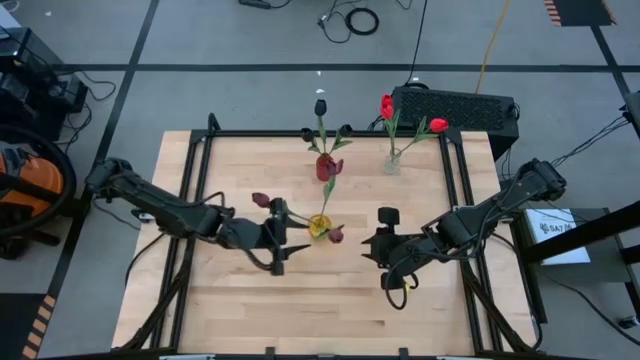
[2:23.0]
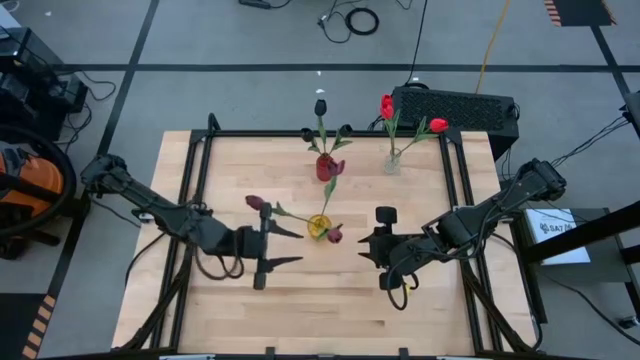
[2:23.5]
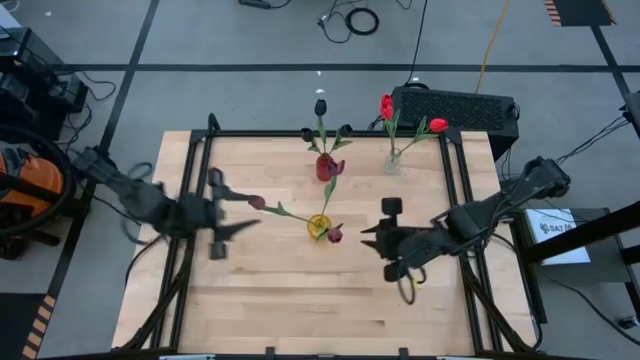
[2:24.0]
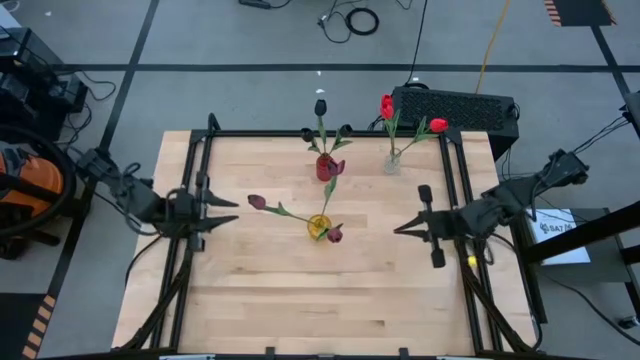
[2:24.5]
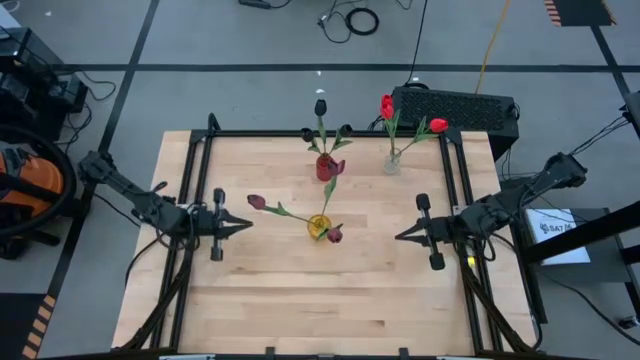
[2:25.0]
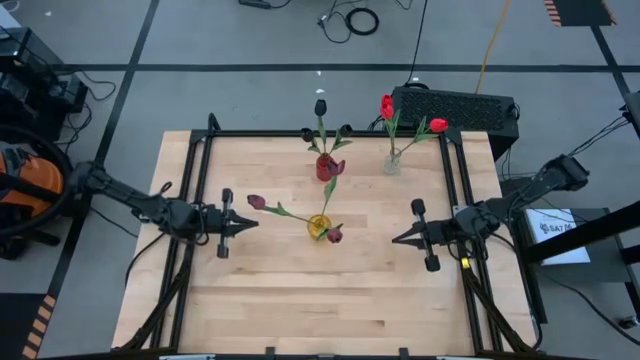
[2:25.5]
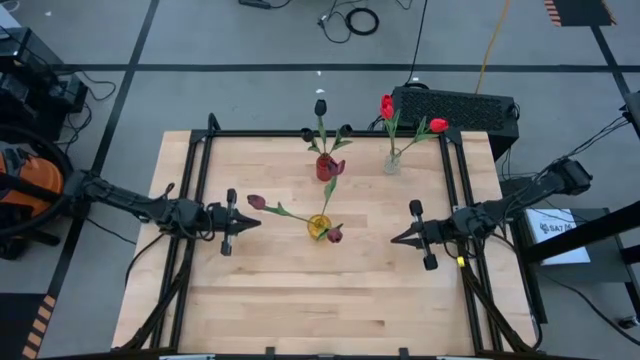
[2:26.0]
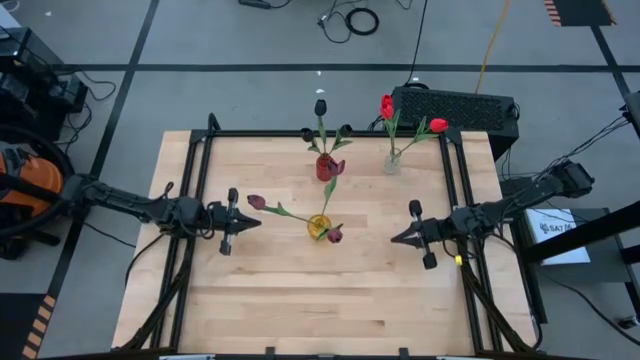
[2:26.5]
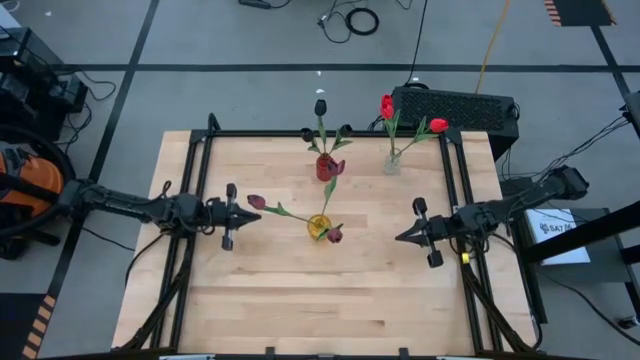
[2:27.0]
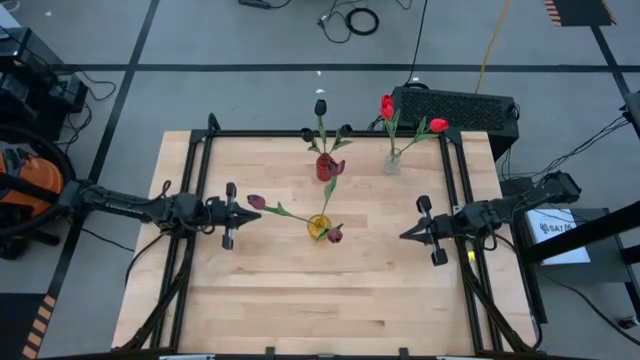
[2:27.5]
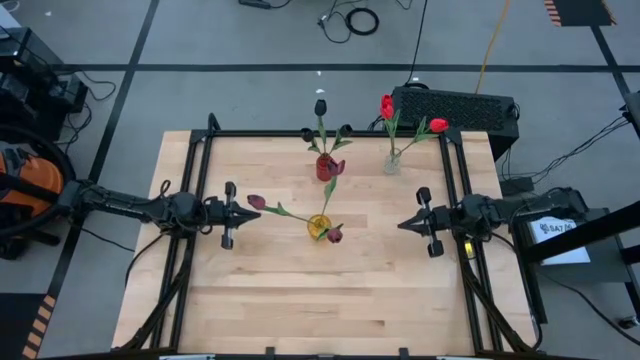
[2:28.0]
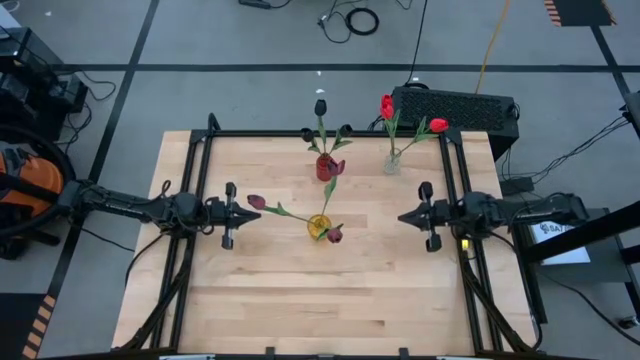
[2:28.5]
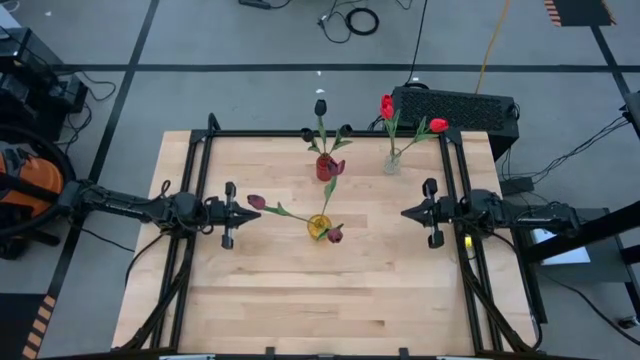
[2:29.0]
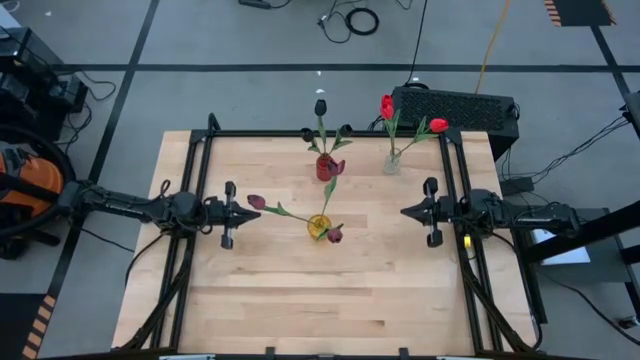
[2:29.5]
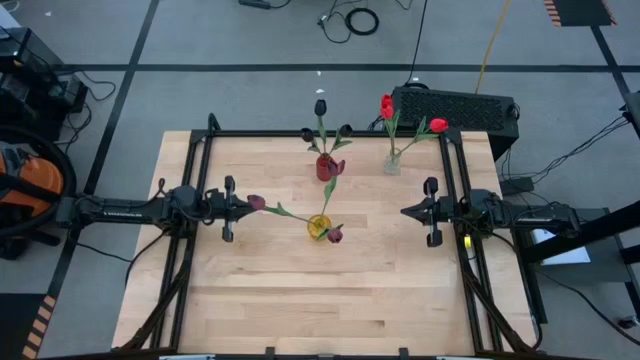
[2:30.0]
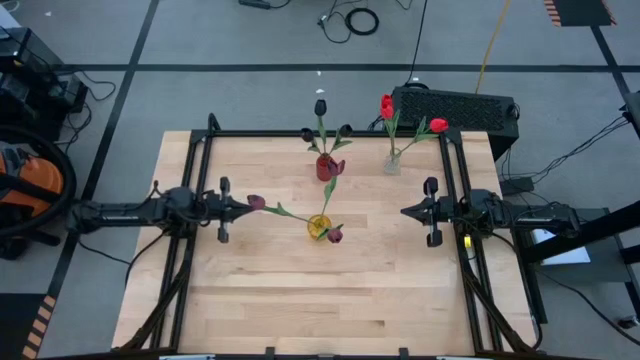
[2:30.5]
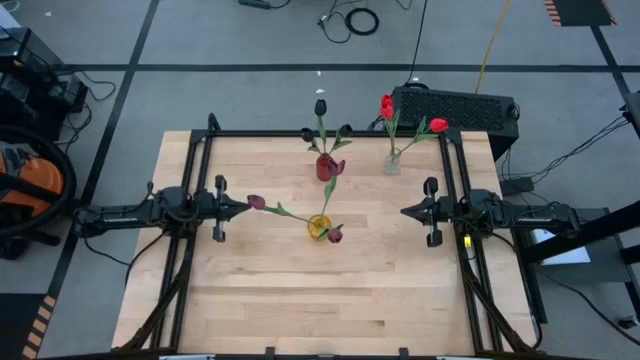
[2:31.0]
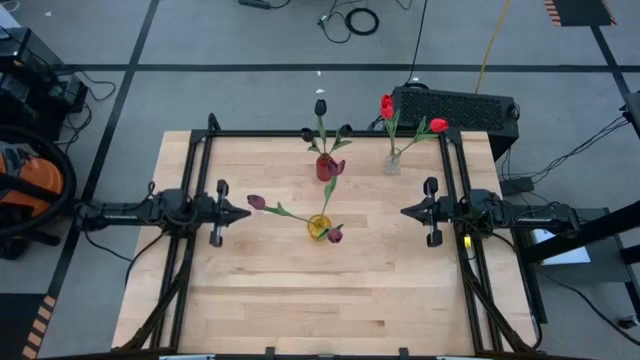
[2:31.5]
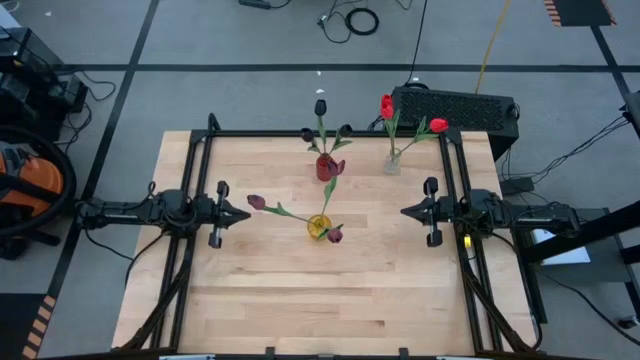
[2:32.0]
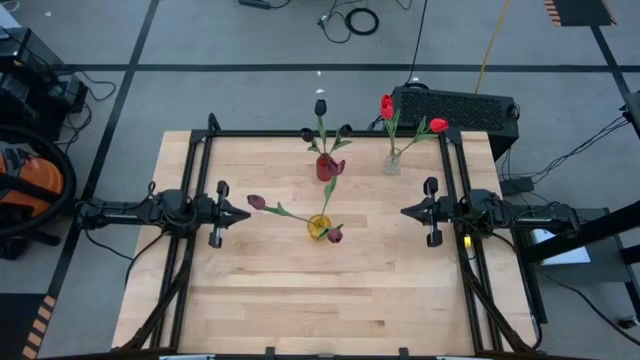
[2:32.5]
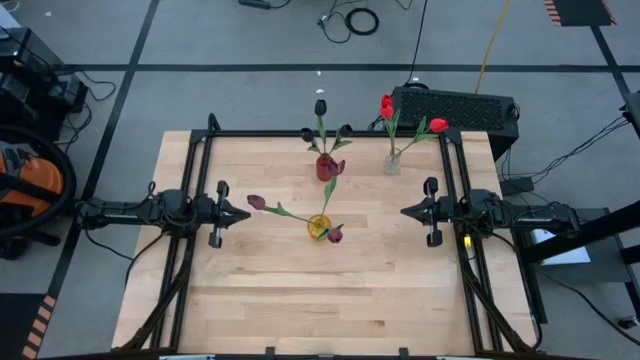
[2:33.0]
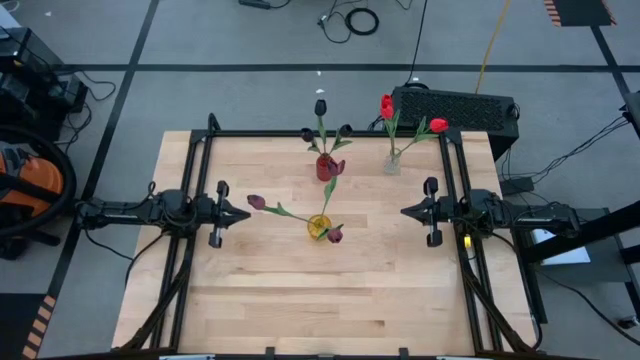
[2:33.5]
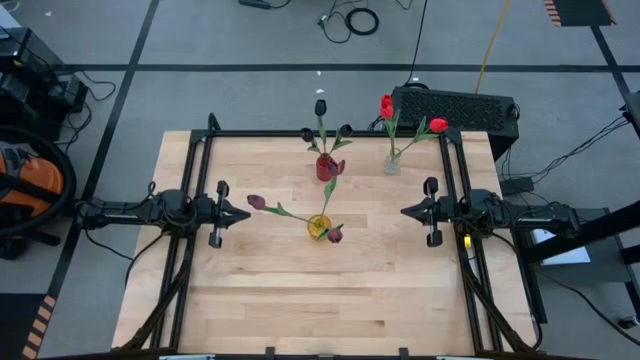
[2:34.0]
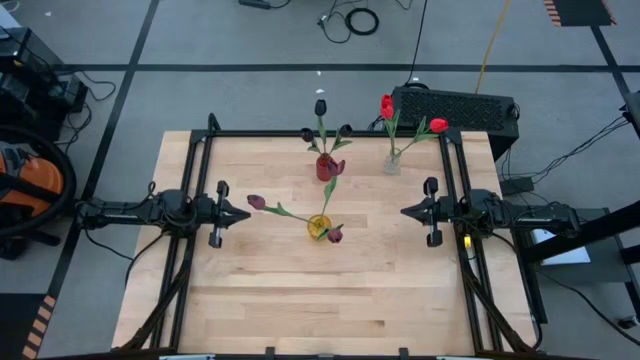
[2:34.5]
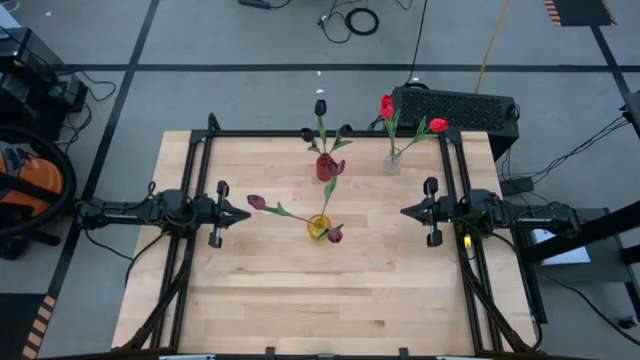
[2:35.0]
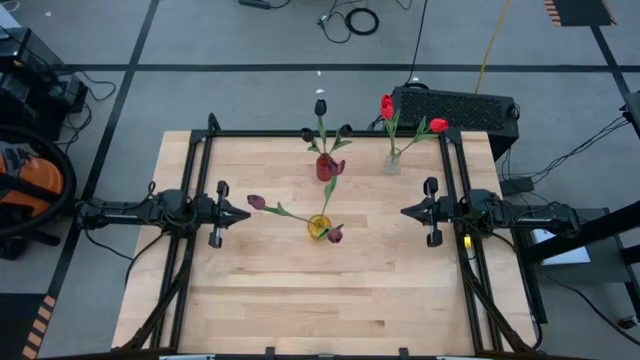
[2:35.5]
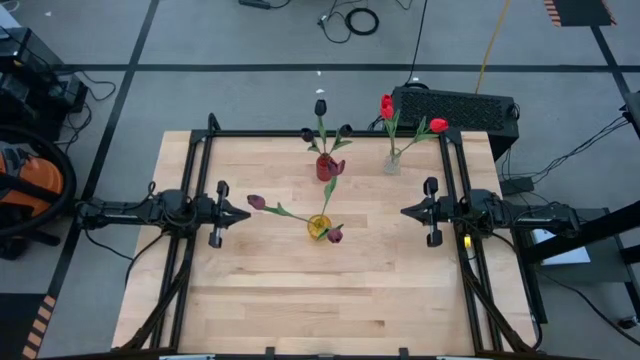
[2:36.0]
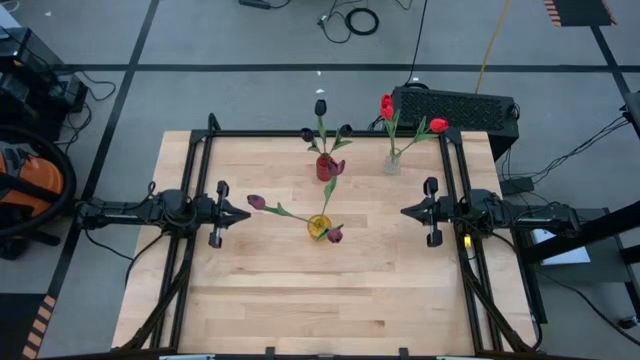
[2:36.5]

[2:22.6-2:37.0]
Task: Sort flowers into vase by color
Return to Home Position

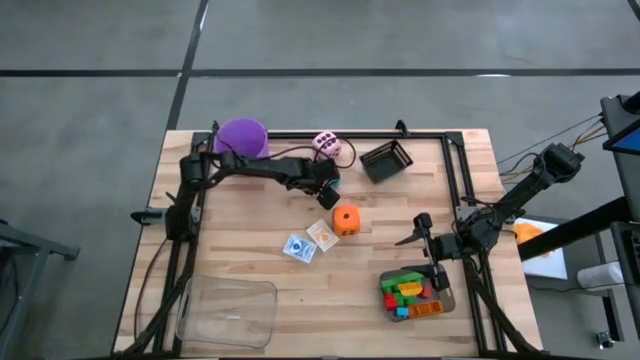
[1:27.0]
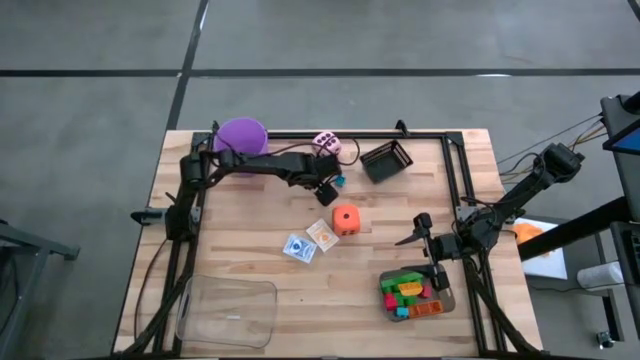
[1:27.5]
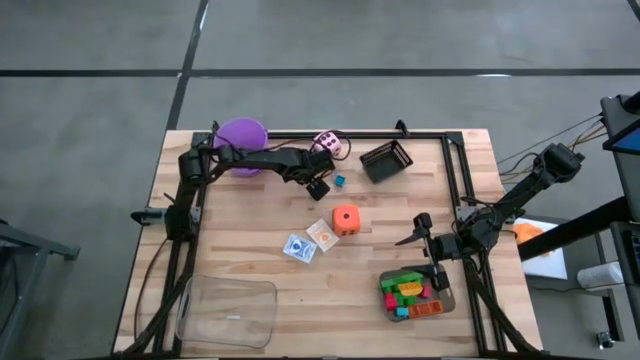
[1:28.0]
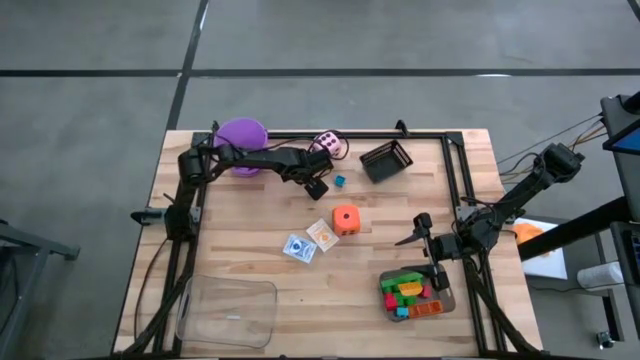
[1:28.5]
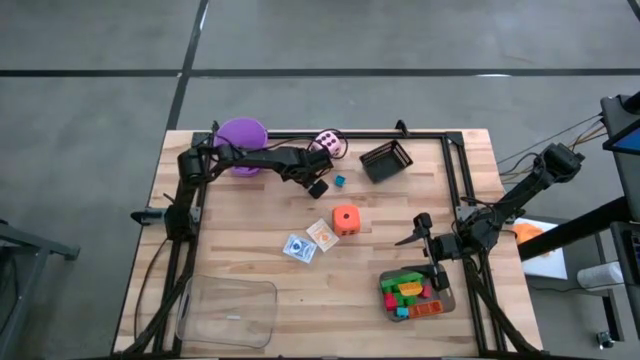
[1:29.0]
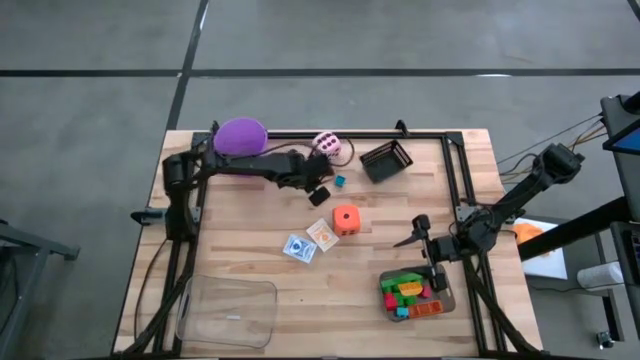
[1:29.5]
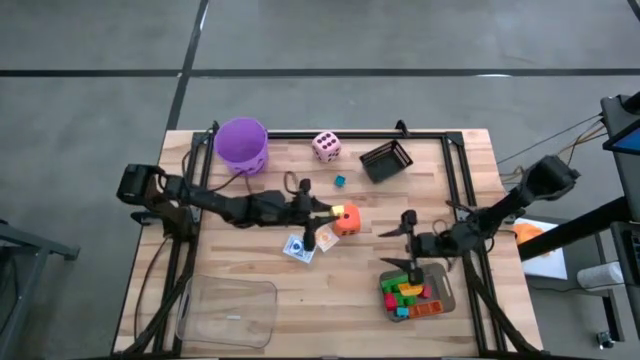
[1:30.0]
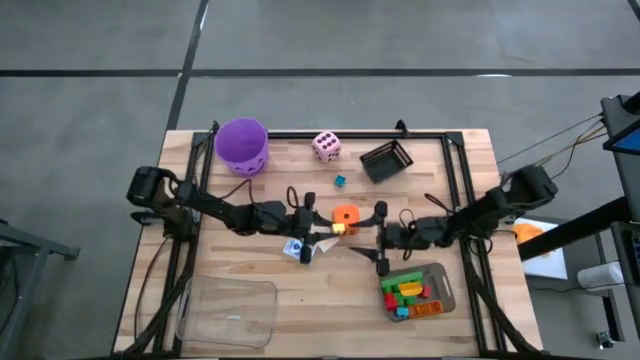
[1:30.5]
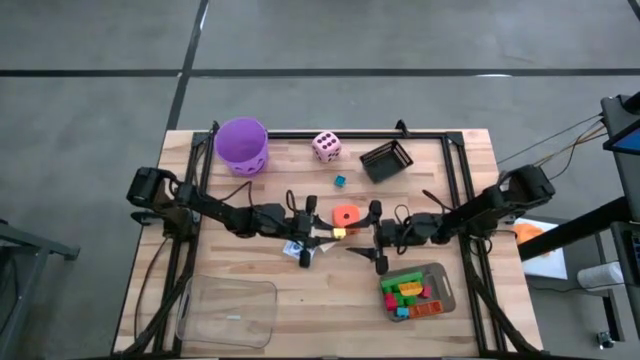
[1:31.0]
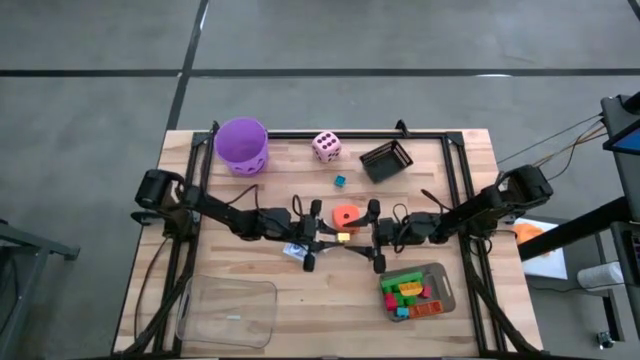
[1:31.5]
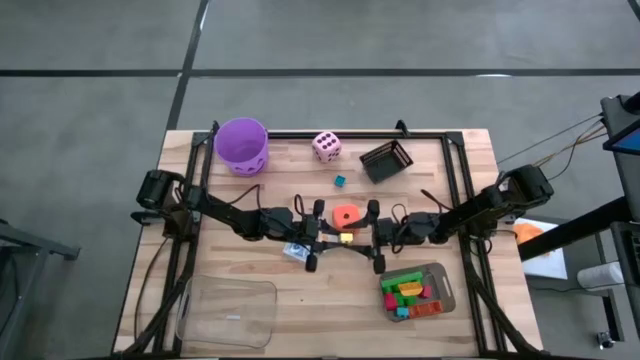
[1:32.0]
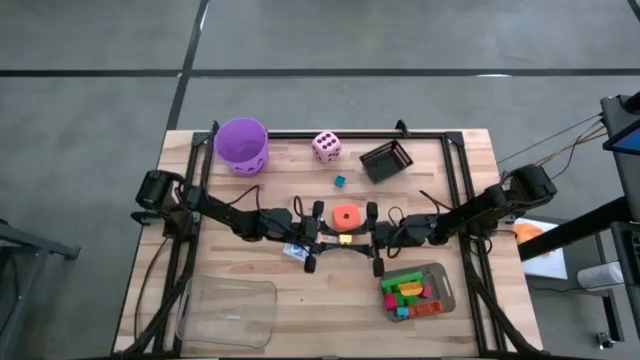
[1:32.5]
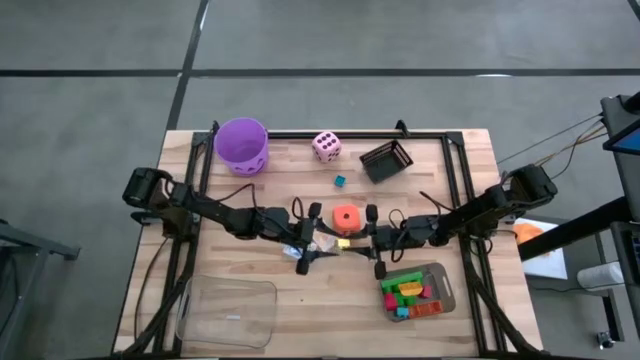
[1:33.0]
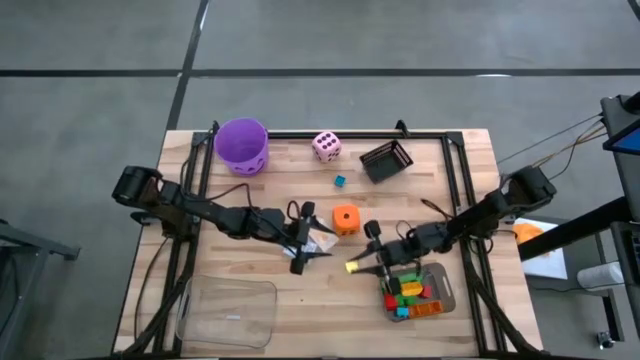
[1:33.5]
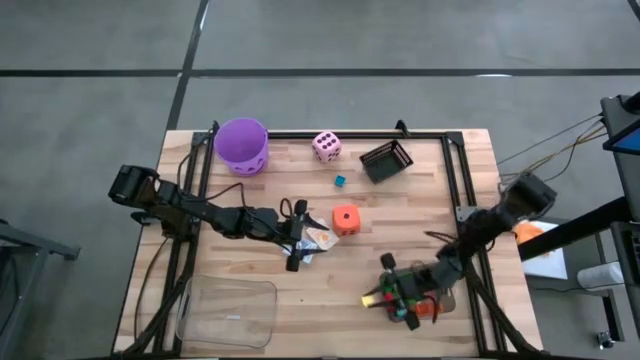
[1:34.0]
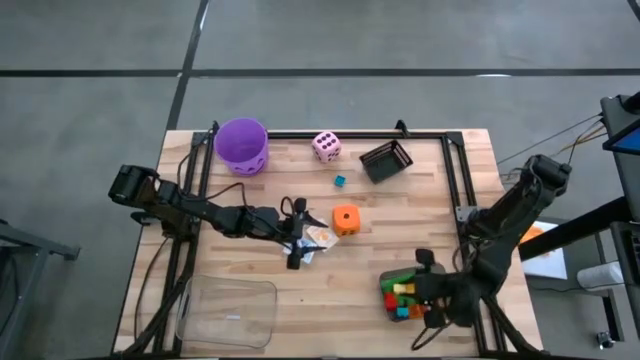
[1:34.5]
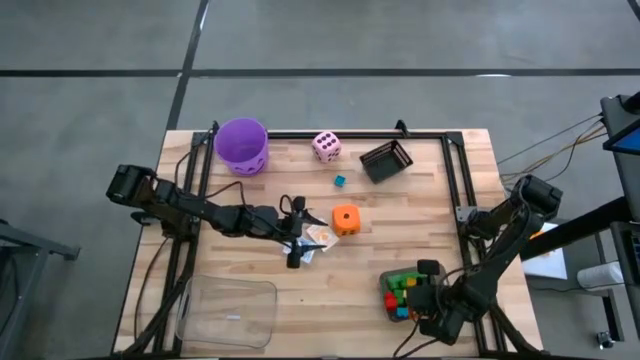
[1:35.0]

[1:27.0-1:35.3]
Task: Pick & Place Toys
Put the yellow game piece into the black bin
